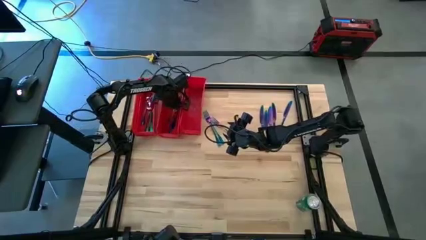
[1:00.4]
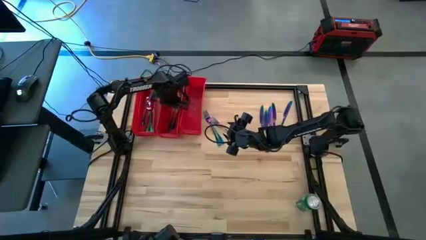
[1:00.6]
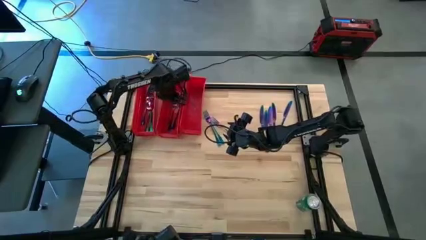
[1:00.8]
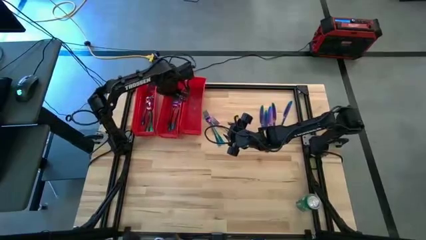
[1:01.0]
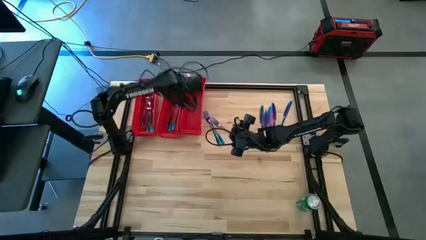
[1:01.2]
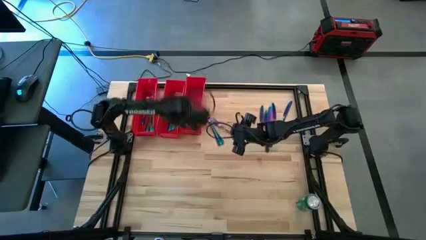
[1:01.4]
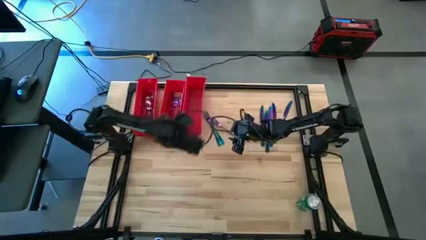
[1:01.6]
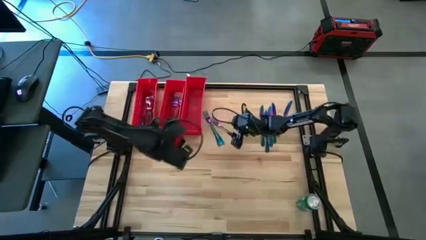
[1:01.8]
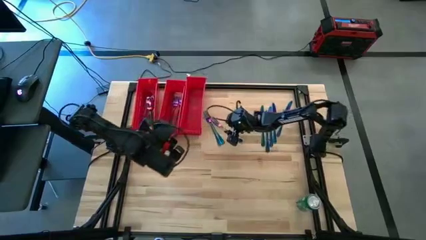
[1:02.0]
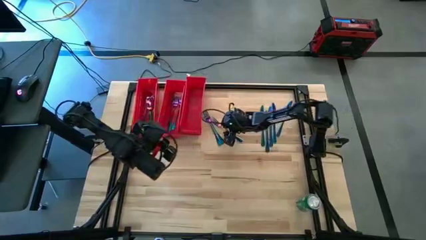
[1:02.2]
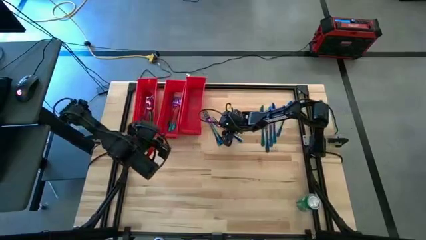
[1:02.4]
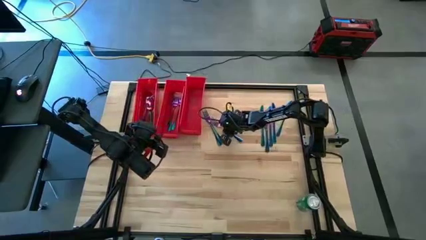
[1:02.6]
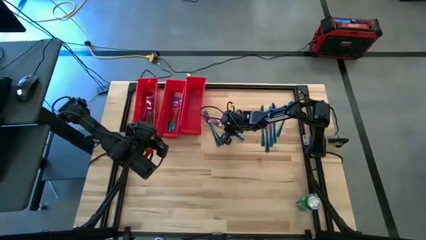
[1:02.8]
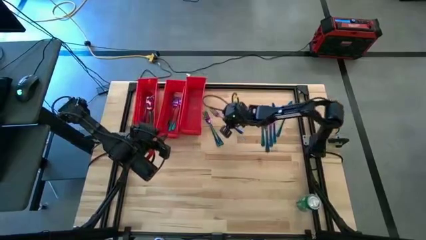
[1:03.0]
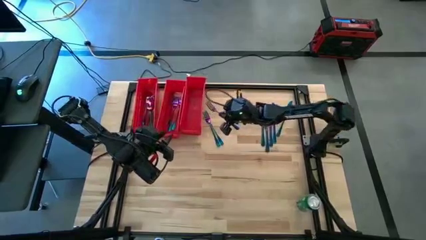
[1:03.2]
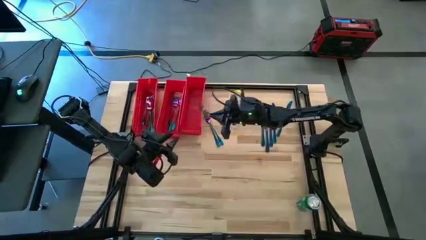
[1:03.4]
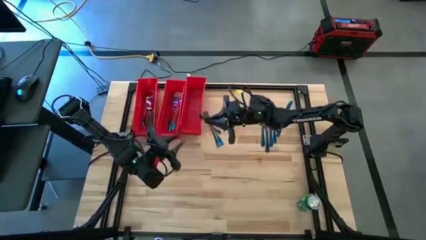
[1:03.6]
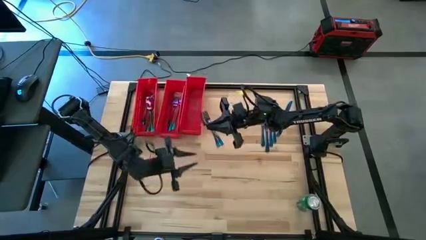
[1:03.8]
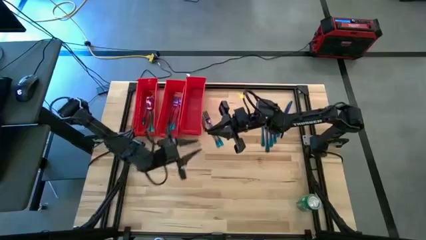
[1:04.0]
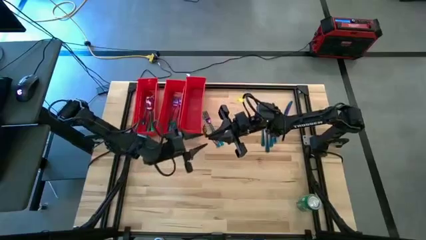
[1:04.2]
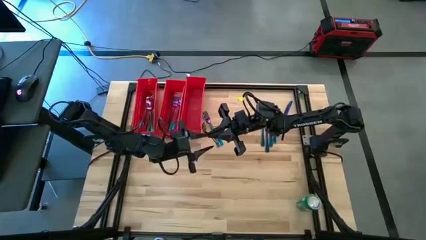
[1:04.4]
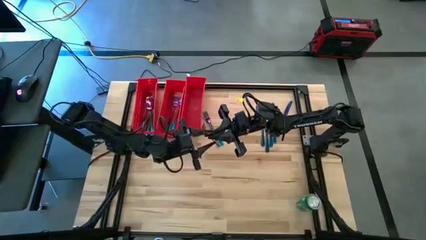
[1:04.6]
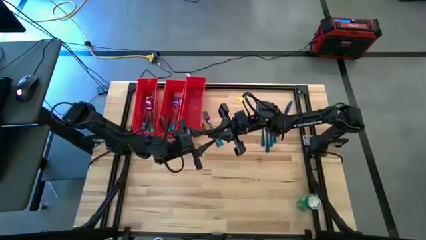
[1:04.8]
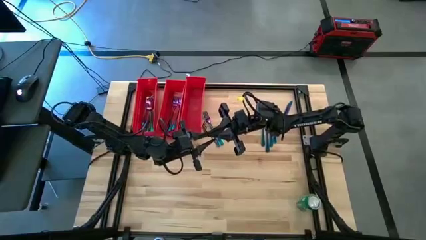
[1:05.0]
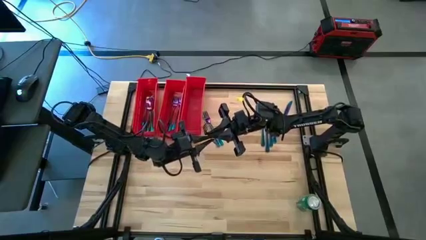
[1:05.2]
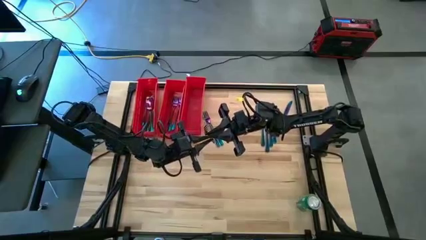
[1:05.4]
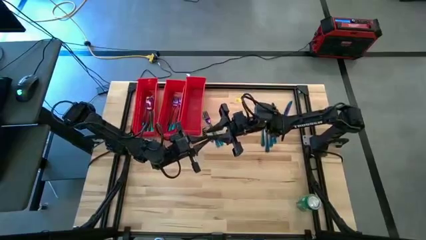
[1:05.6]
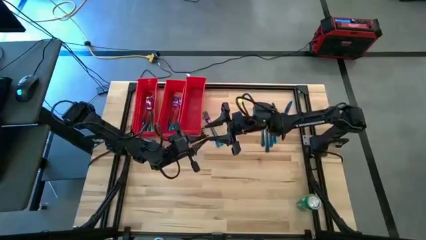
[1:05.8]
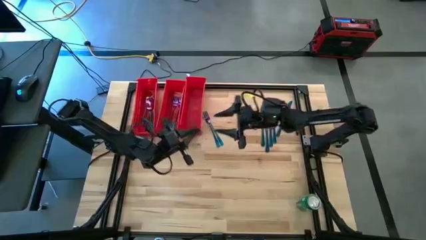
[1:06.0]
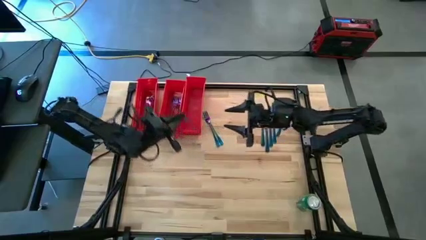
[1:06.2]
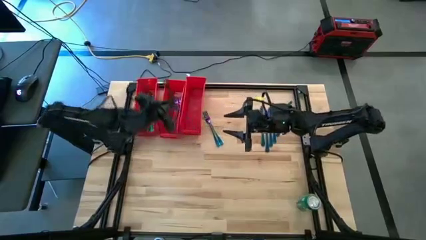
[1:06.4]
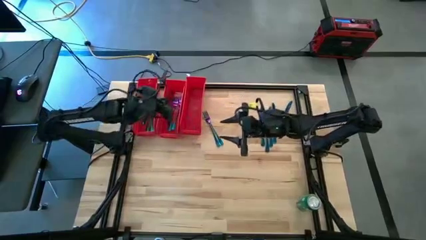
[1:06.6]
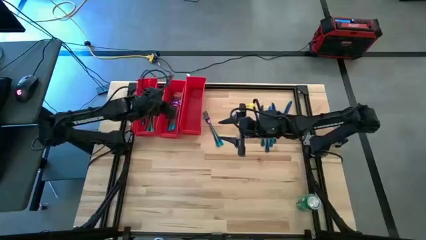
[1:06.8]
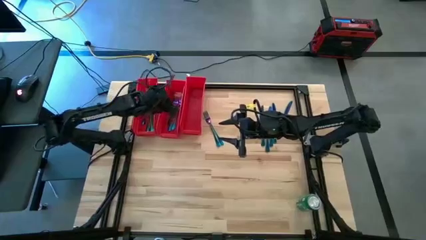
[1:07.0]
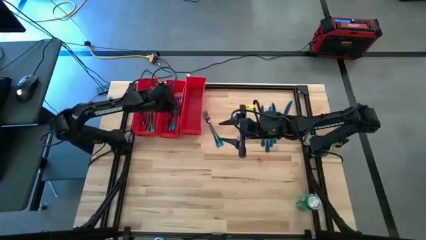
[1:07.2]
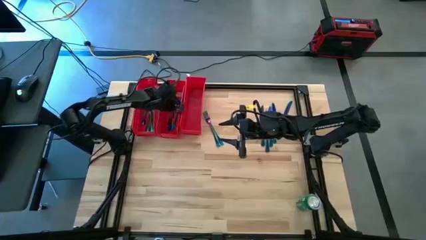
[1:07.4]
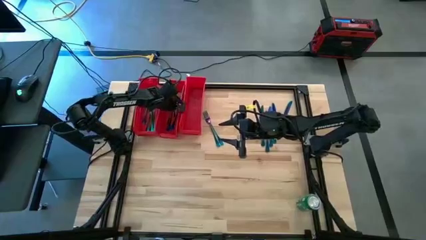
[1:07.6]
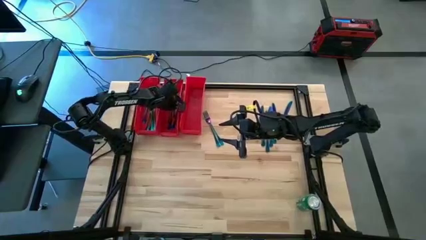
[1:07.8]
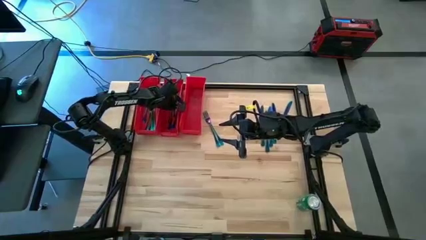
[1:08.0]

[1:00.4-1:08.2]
Task: Sort silverware
Put the blue fork into the middle red bin

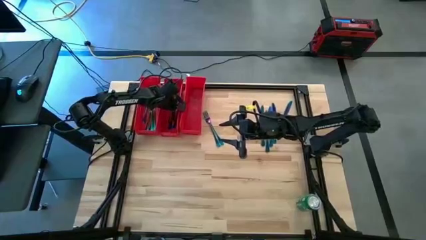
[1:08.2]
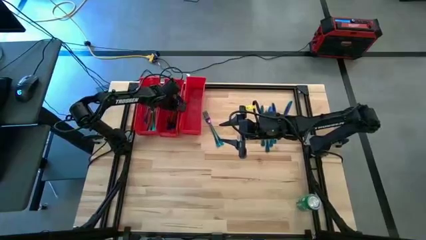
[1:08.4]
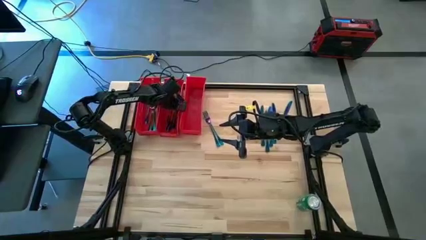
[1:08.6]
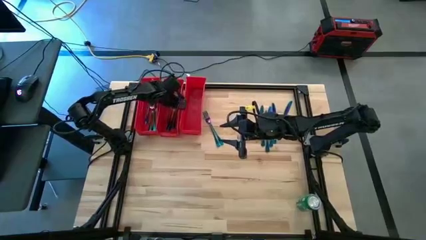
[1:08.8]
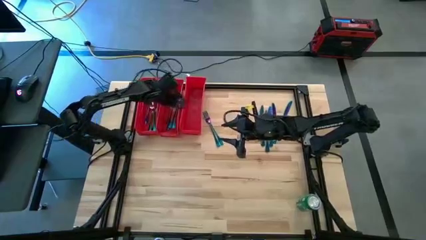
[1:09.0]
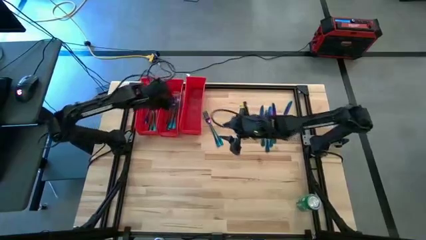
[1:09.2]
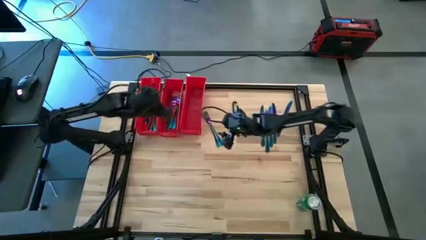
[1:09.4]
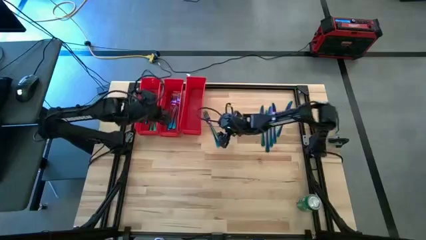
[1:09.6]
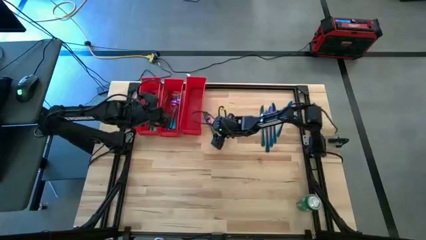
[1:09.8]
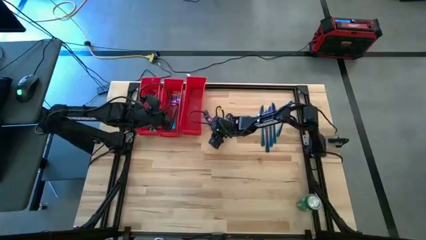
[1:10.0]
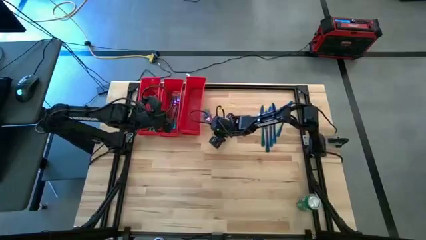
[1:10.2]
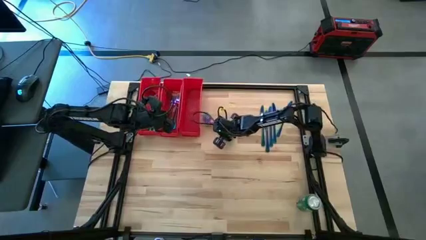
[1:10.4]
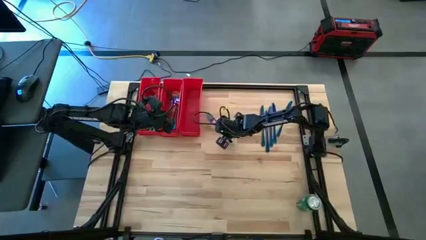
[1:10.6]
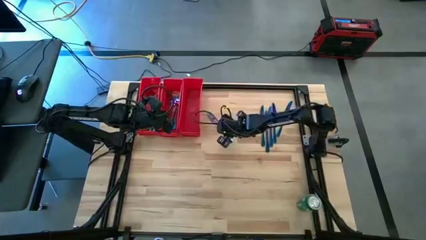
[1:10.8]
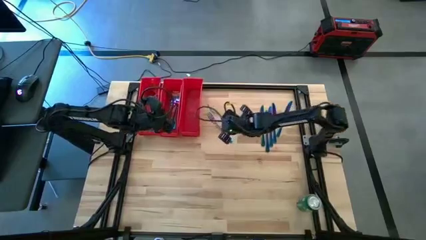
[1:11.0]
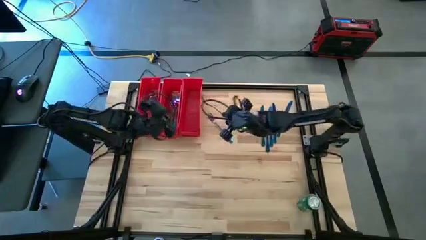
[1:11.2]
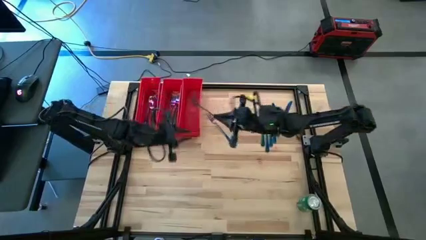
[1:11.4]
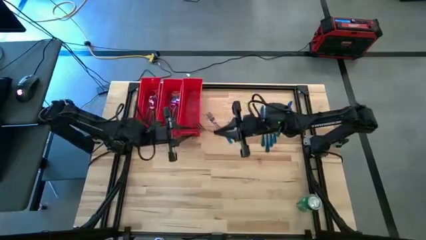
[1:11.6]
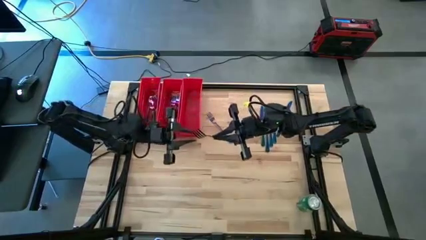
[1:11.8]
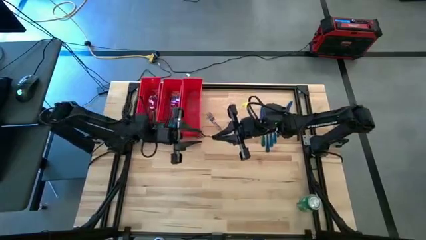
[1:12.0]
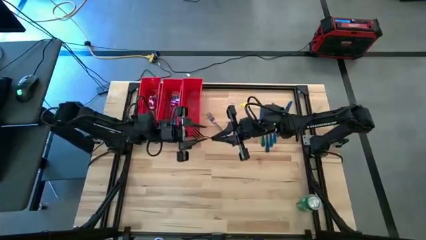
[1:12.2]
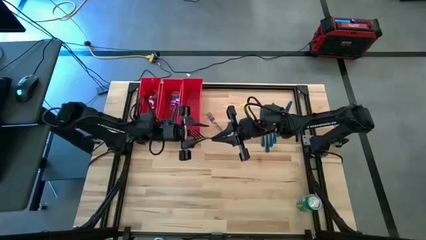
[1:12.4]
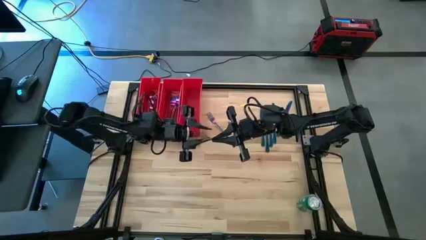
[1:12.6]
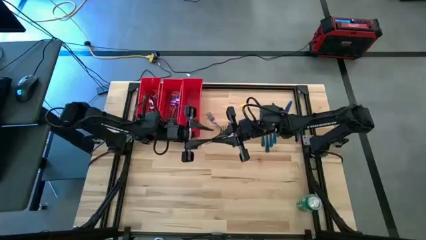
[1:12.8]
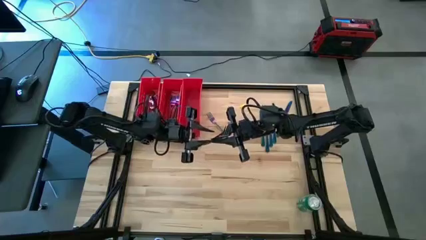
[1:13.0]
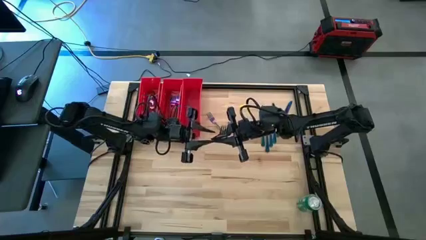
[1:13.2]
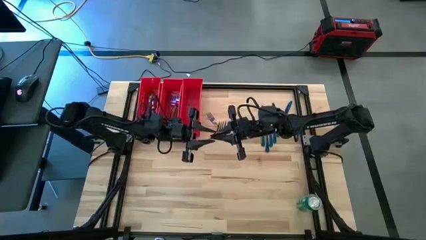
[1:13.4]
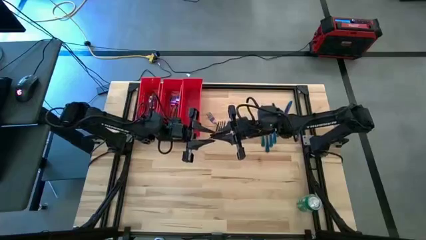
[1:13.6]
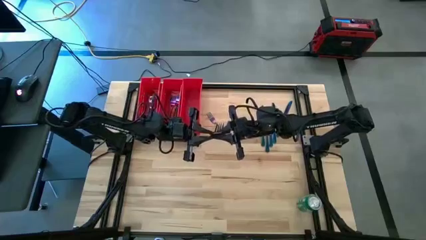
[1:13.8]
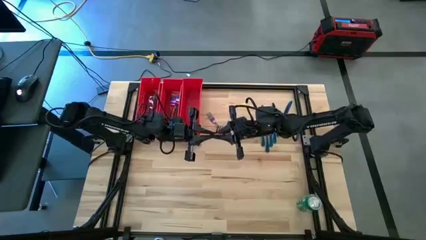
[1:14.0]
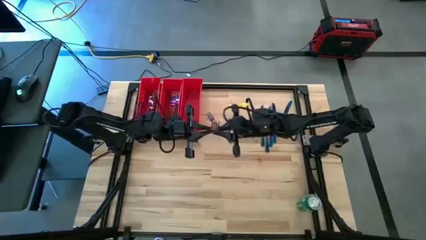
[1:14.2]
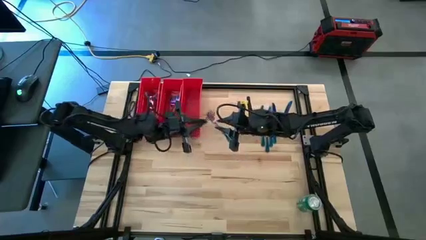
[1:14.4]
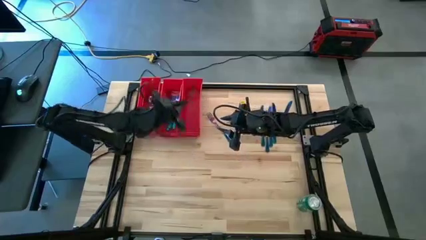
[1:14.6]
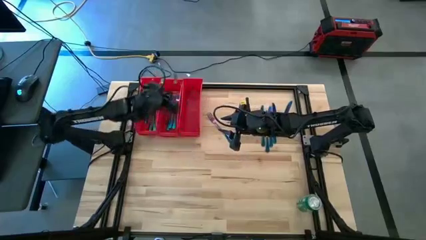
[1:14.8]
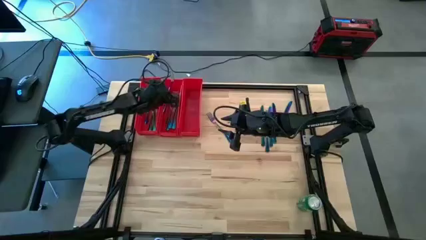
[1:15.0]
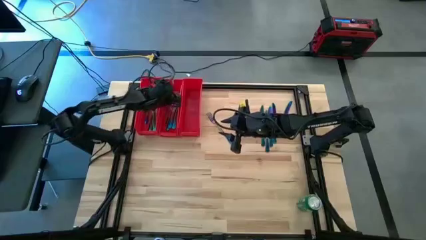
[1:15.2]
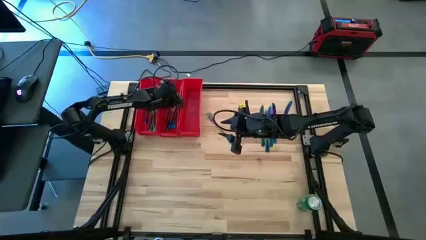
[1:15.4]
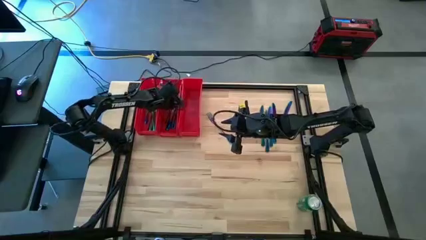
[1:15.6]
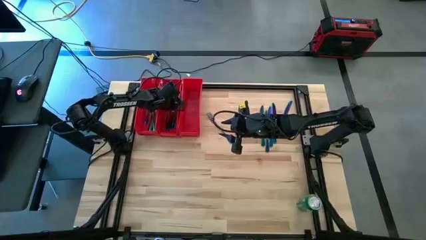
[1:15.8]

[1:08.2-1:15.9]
Put the blue fork into the middle red bin

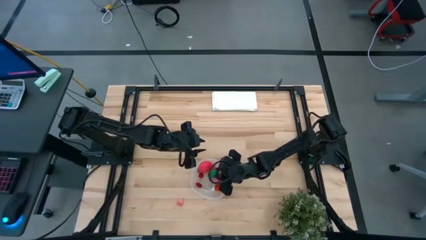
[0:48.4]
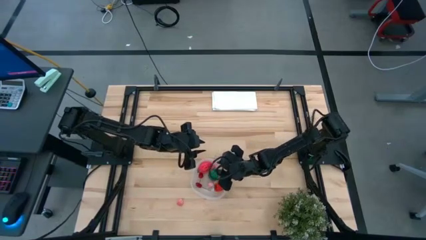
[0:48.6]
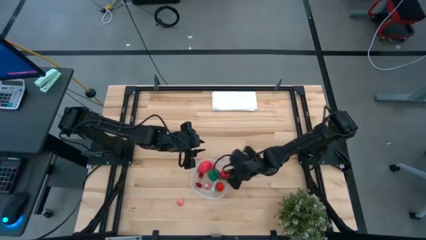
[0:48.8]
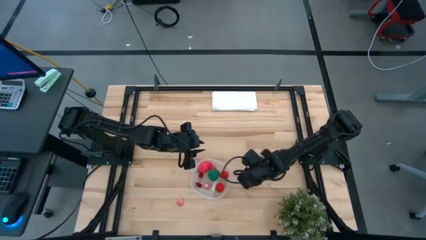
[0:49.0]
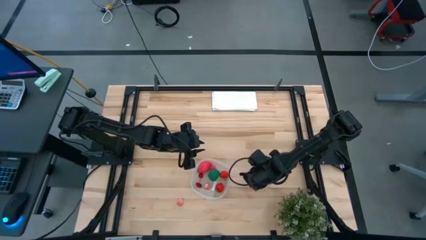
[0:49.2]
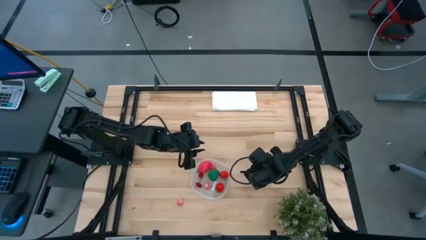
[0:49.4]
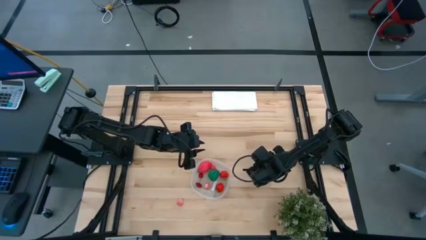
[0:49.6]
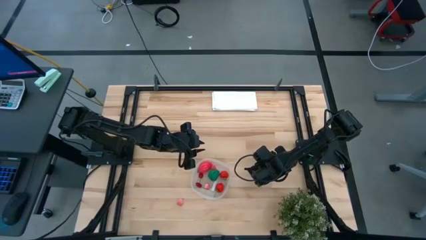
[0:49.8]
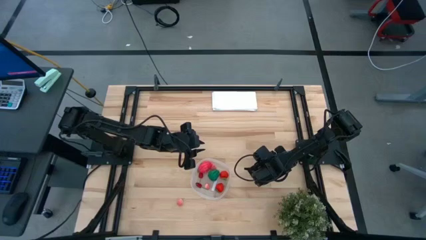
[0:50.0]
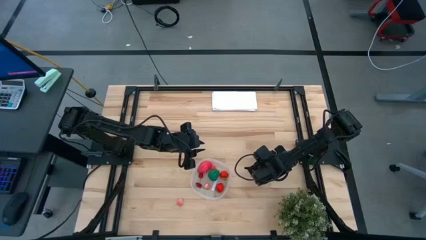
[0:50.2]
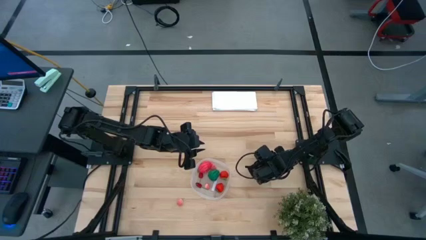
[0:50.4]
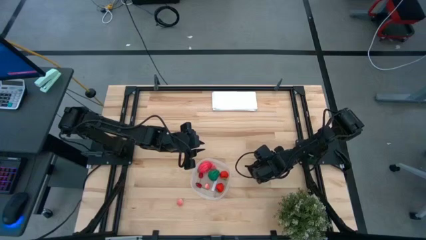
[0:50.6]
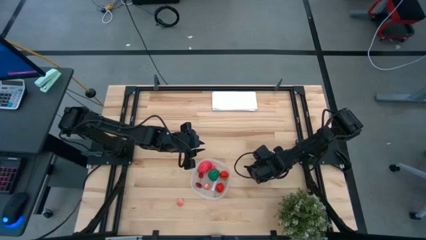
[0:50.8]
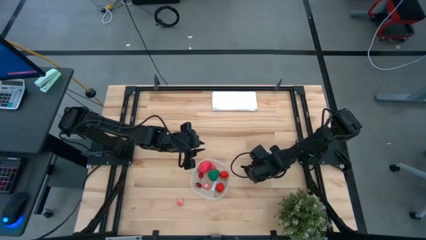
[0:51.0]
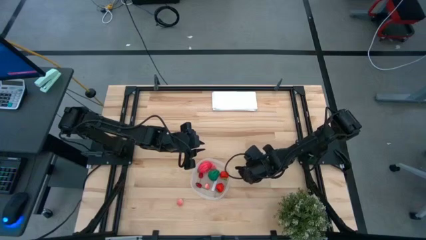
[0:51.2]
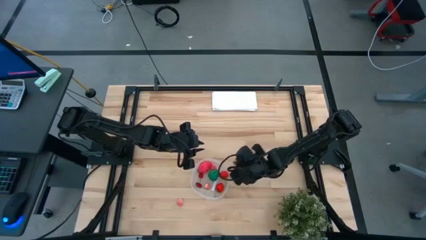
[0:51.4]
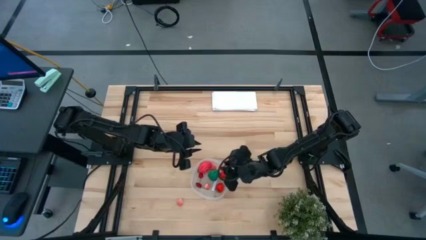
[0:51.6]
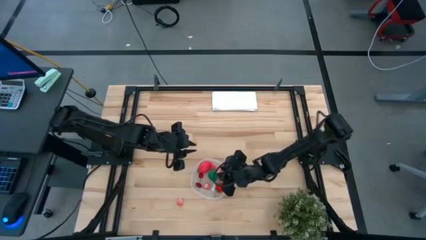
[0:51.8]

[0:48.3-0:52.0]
Task: Pick and placing Produce into tupperware
Put the pink peach into the transparent bin
